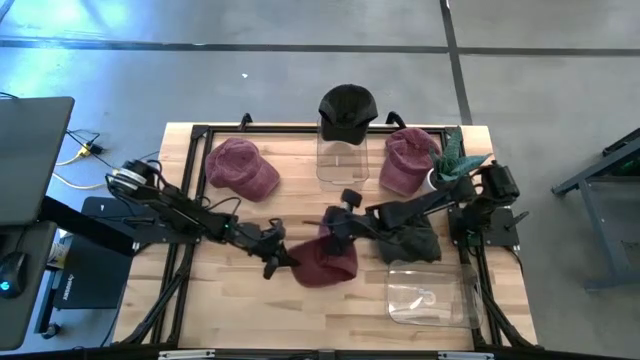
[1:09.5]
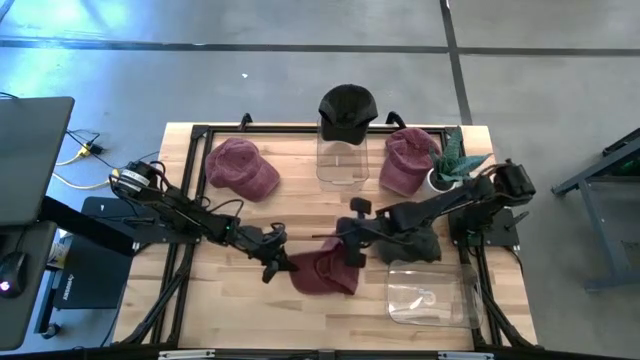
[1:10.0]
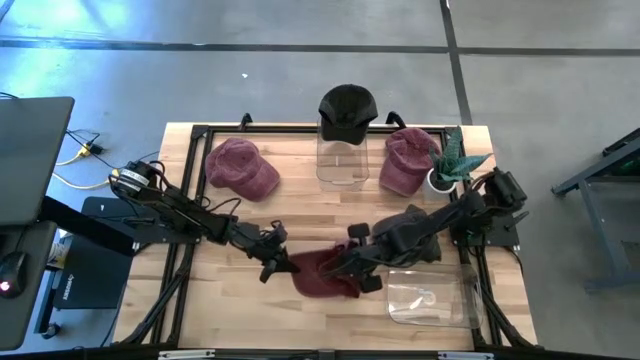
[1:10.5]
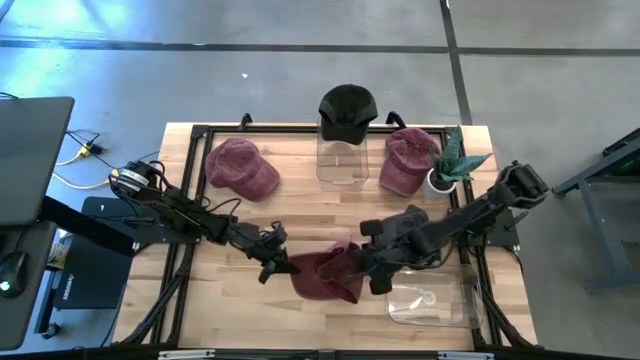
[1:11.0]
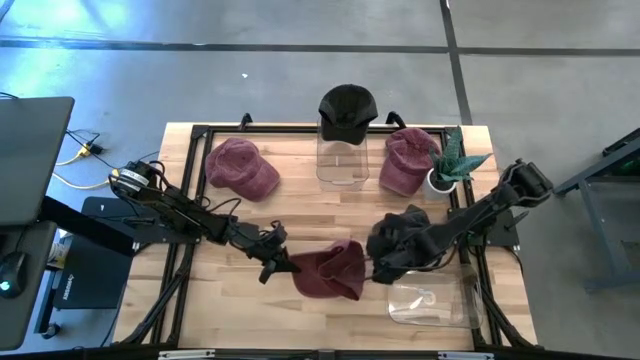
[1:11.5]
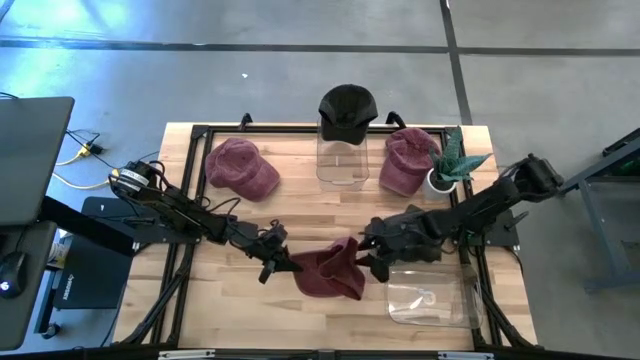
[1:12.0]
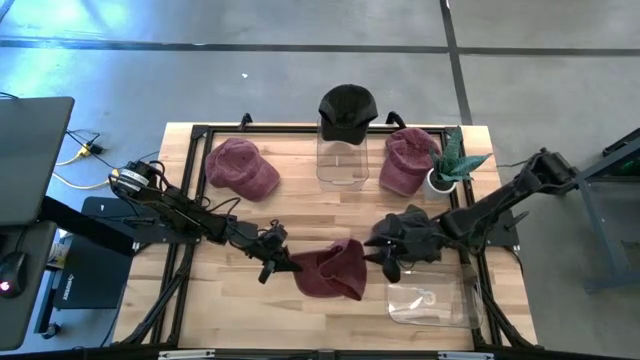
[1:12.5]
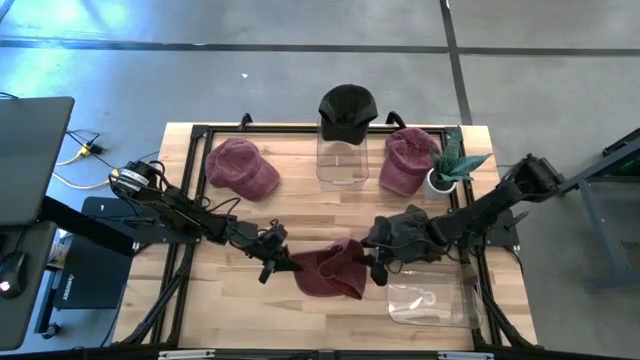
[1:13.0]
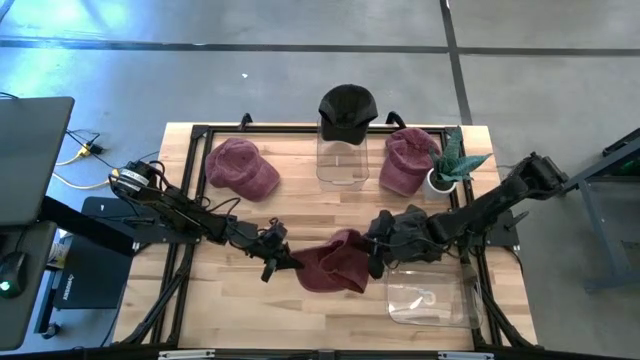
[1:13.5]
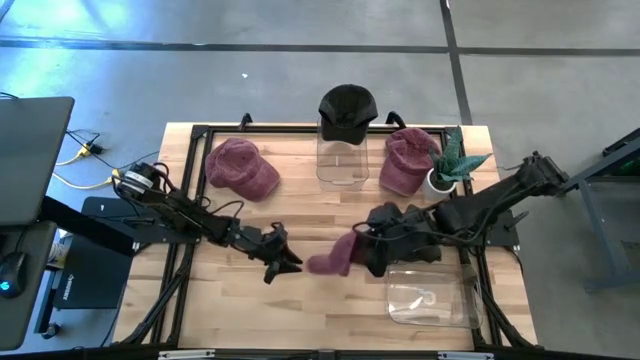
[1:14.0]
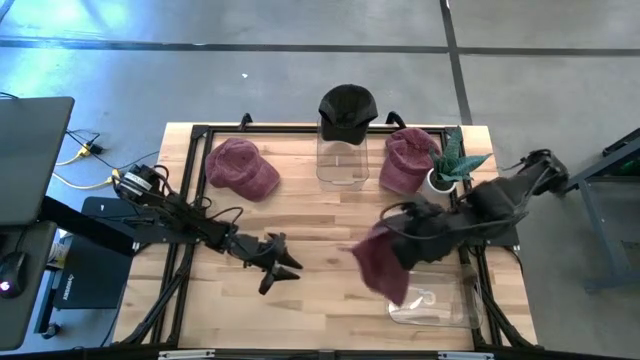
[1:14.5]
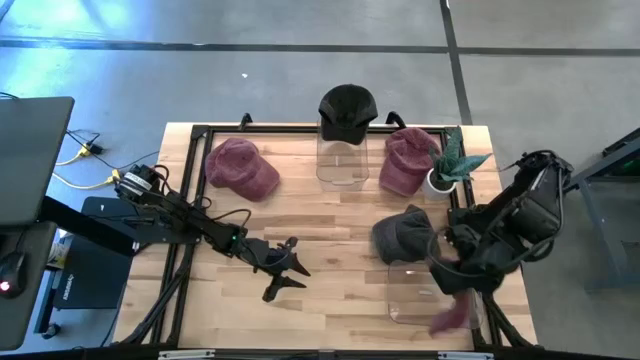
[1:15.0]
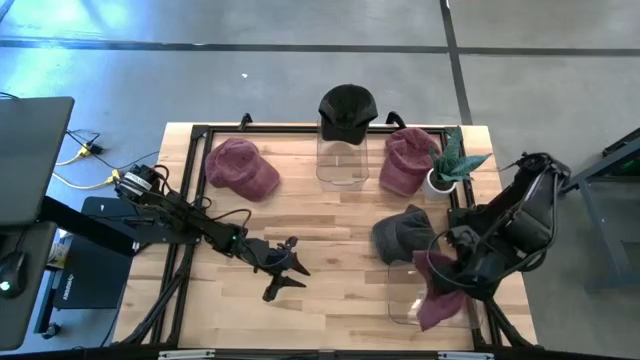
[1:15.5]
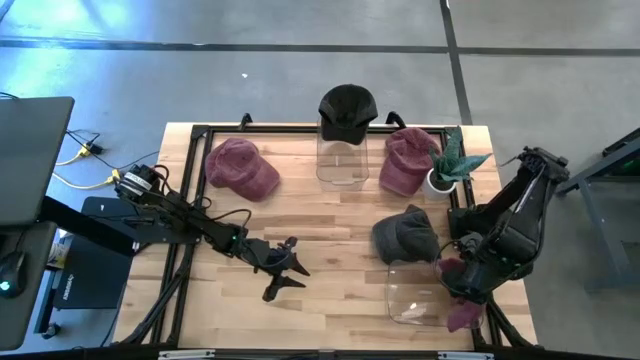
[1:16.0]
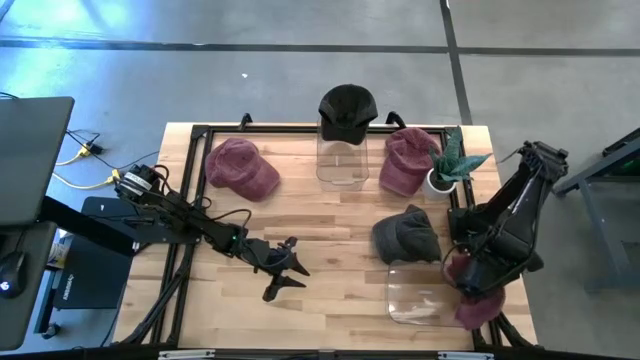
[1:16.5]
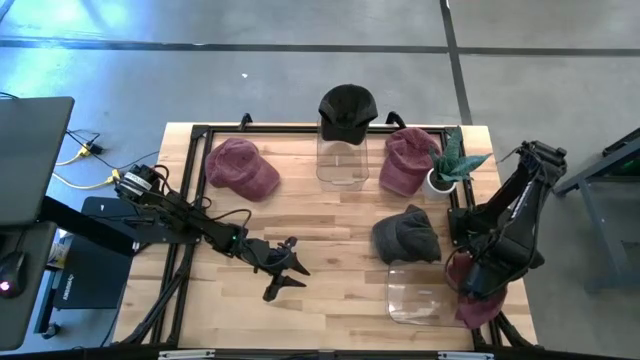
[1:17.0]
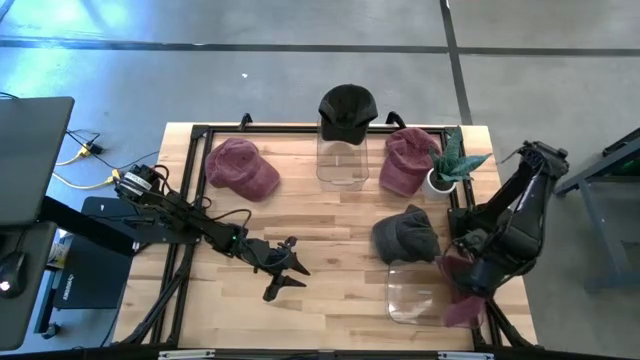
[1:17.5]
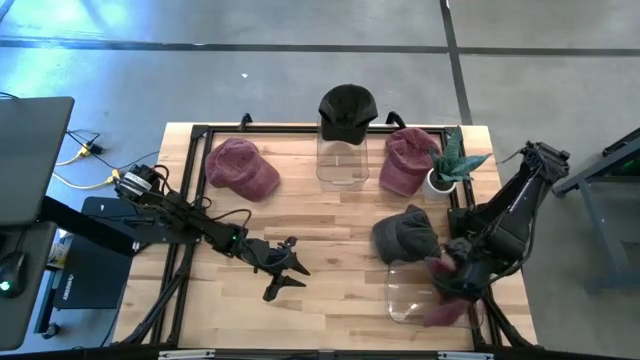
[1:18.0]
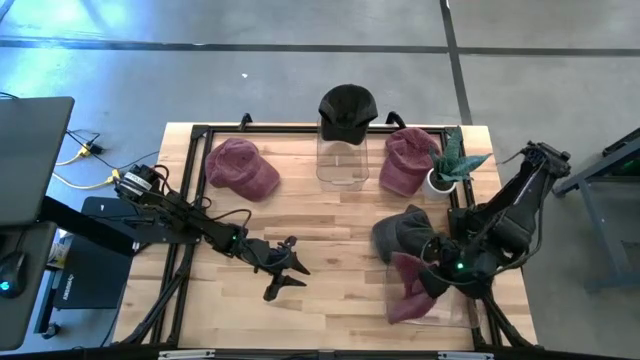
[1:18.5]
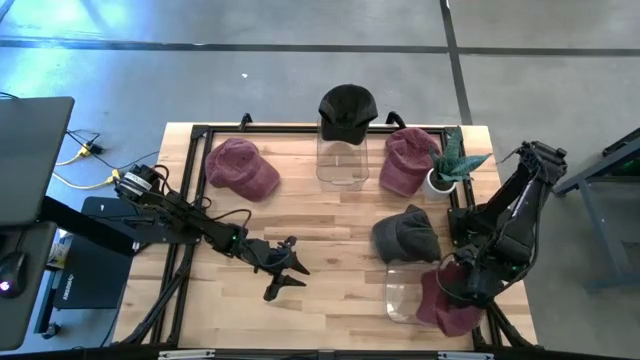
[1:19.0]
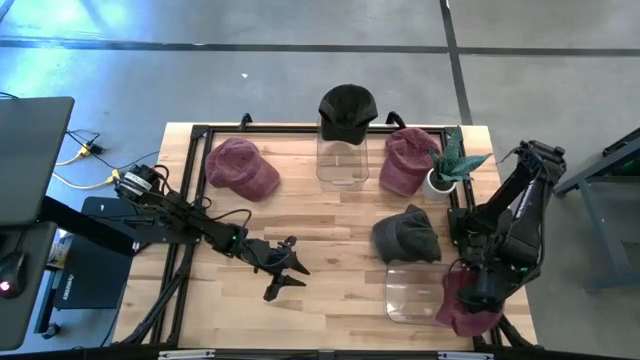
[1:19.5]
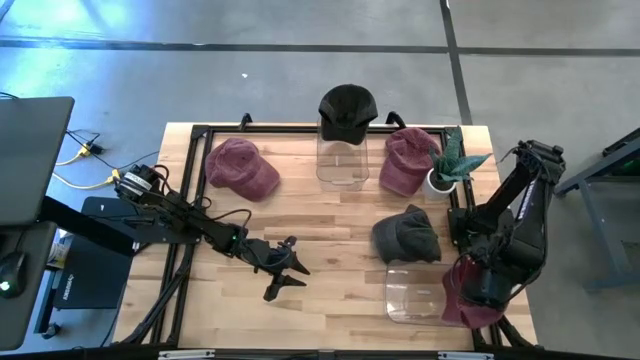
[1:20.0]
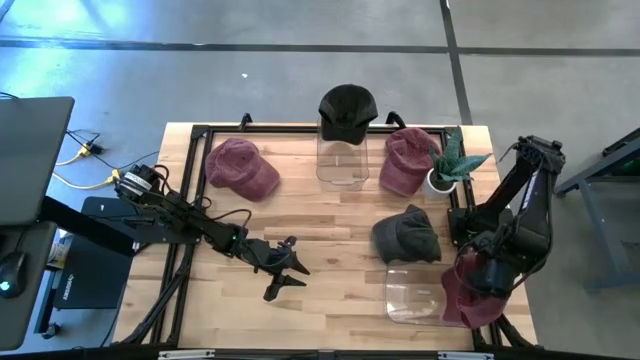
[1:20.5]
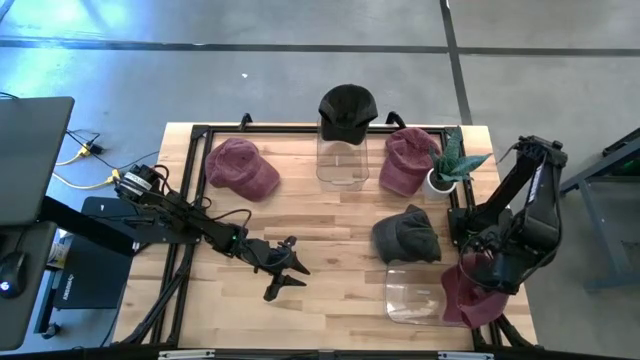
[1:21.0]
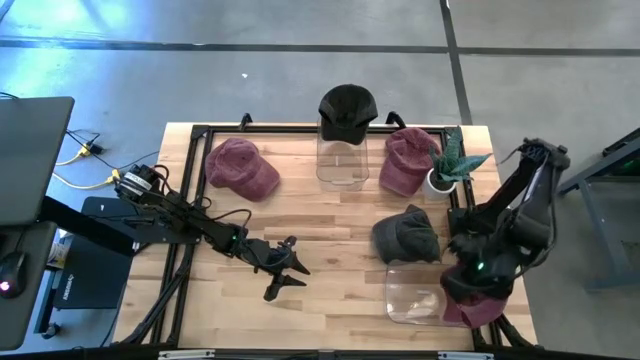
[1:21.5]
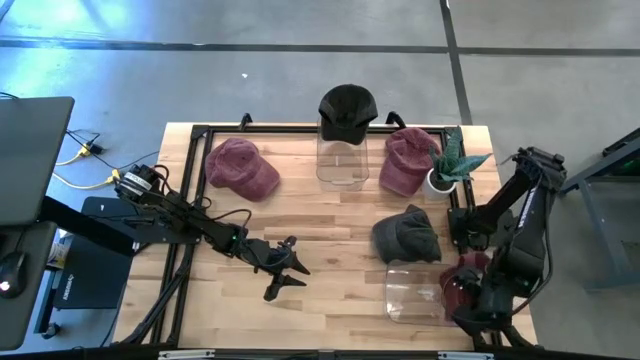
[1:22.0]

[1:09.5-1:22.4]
Task: Pick & Place hat
Put the bottom red cap into the bottom transparent bin

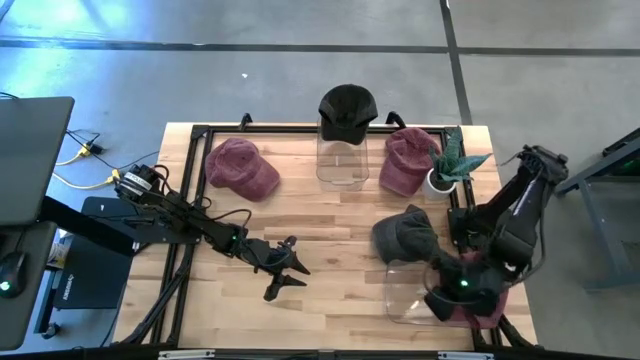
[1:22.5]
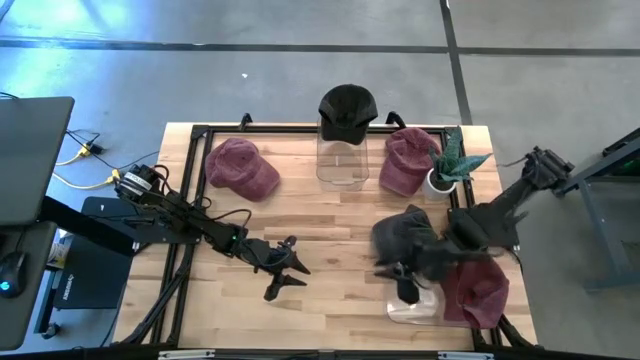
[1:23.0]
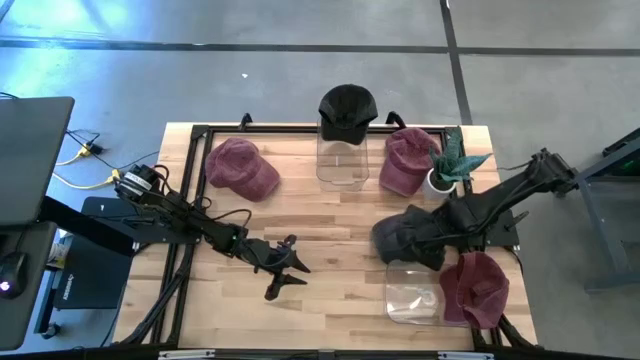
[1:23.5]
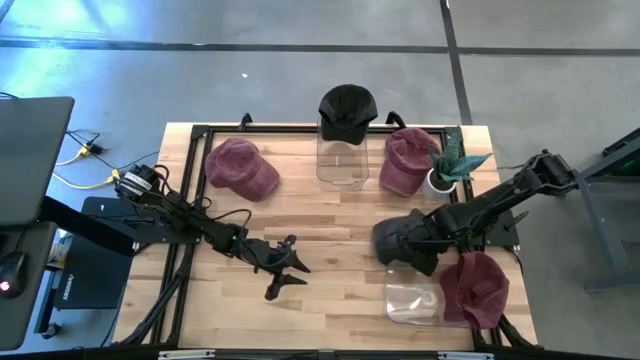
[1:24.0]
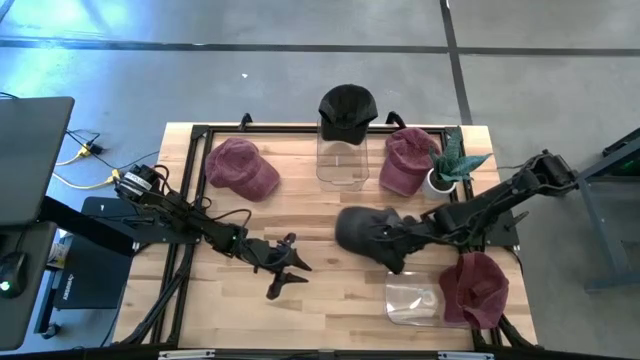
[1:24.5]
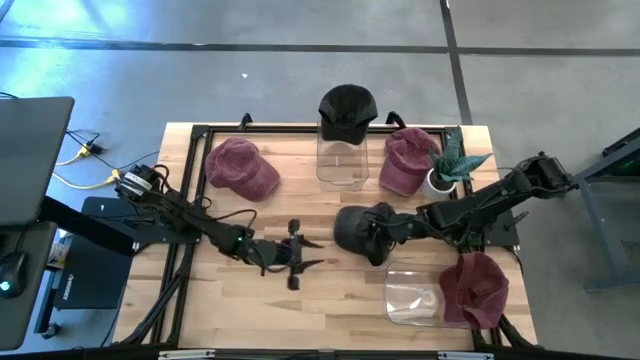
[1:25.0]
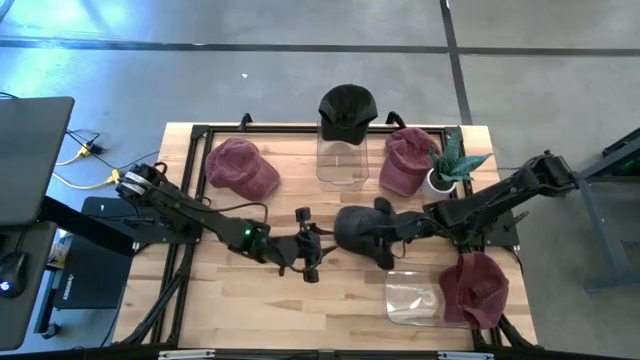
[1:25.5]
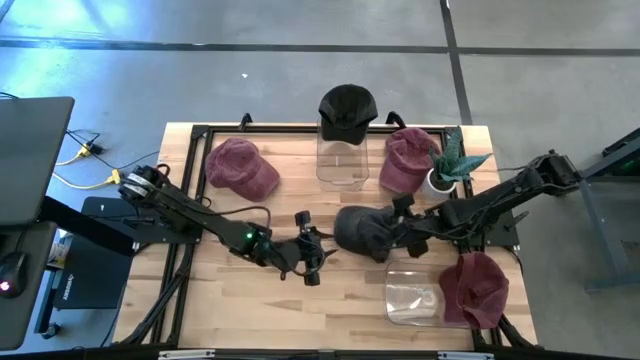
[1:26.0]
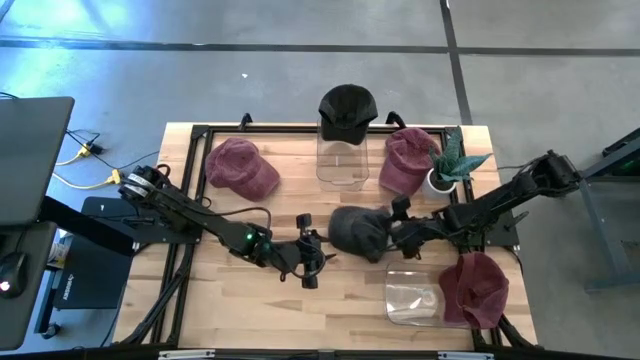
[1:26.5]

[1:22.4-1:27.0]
Put the black cap into the top transparent bin

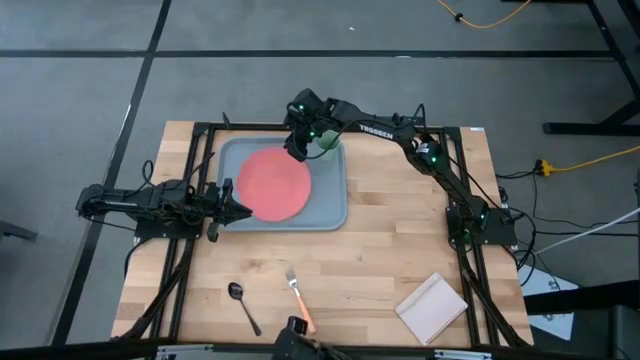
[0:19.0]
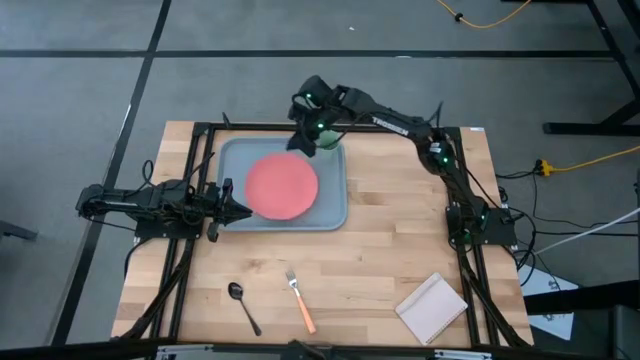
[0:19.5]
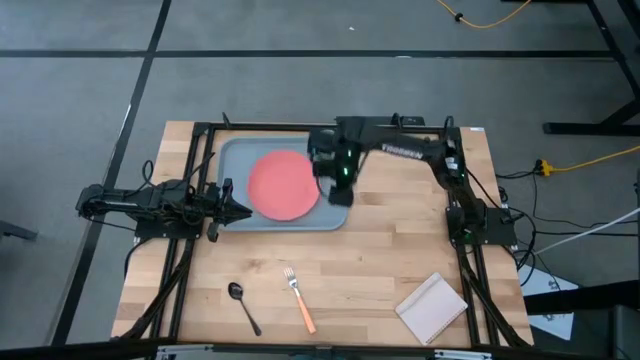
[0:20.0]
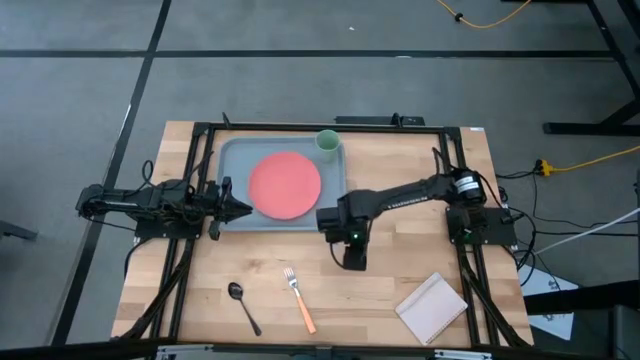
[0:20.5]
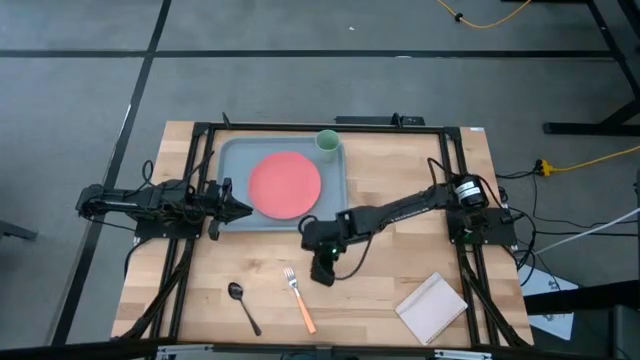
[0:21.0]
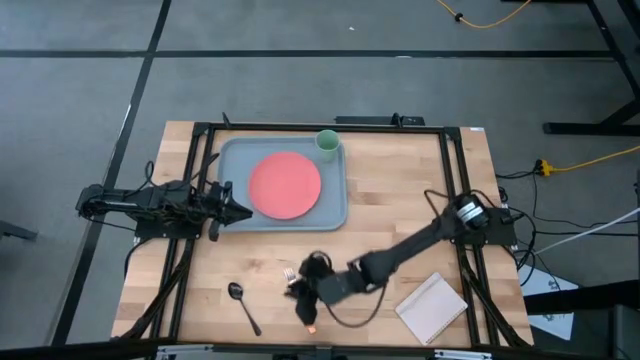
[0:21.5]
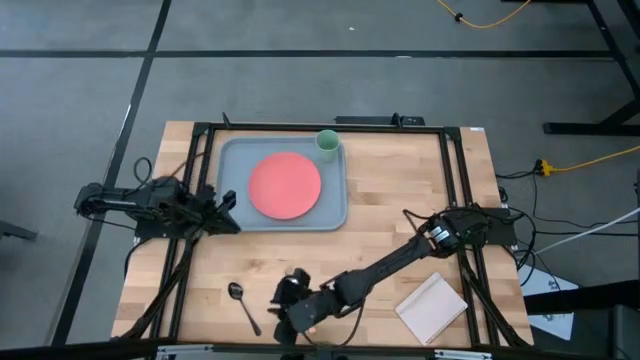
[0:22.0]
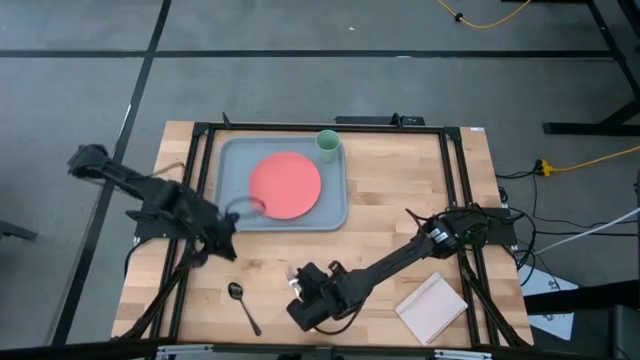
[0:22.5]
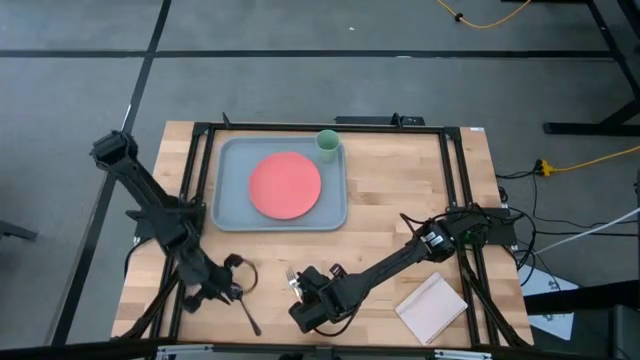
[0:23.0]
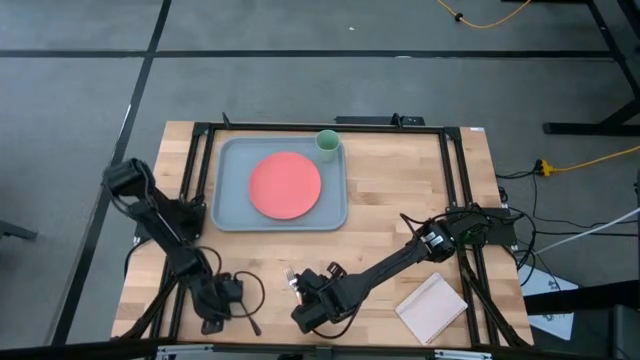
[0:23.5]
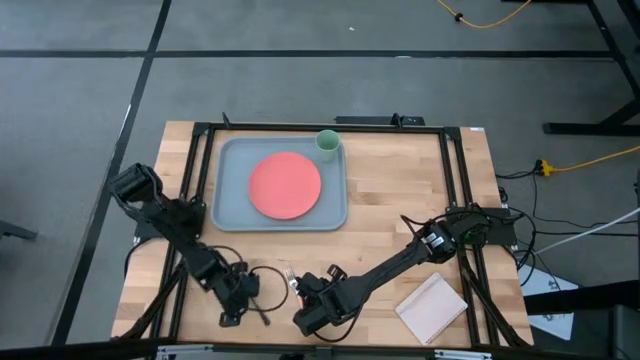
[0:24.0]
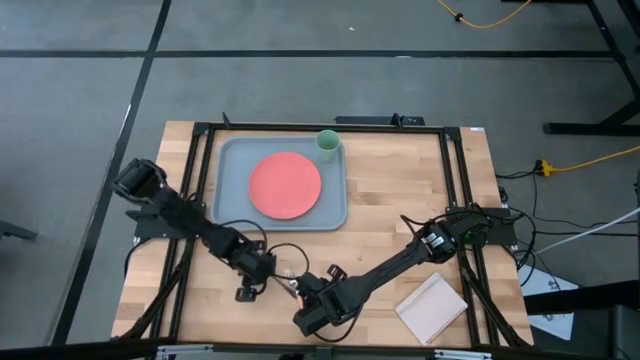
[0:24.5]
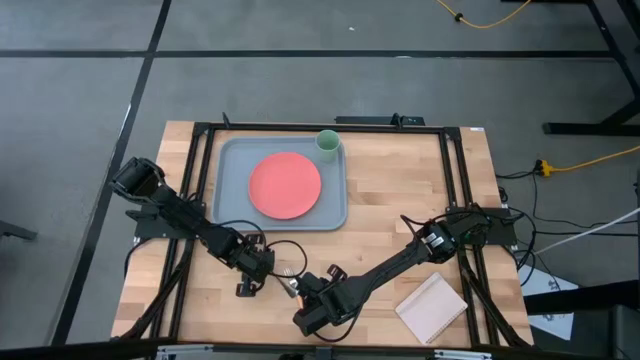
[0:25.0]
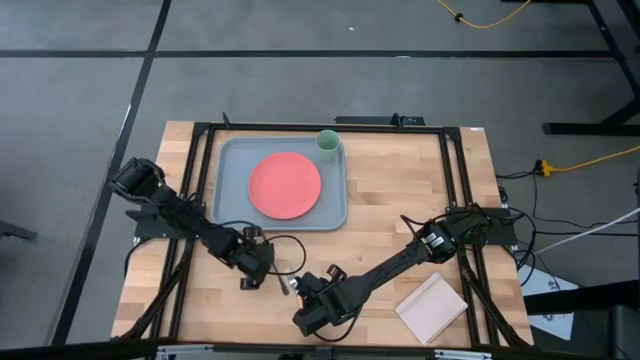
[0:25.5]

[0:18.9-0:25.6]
Task: Pick and place plate/cup/fork/spoon on tray
Prepare the black spoon
